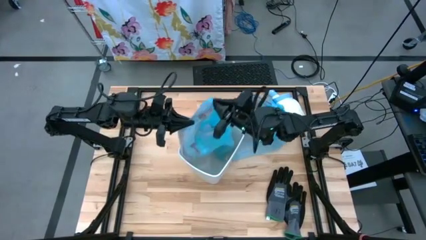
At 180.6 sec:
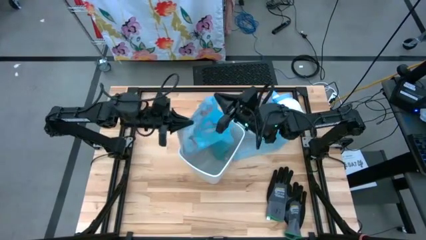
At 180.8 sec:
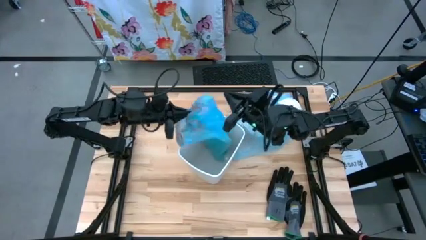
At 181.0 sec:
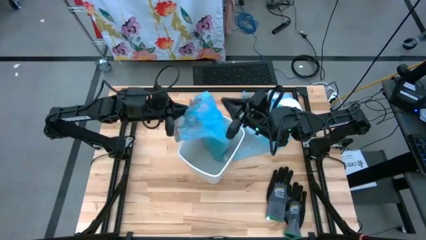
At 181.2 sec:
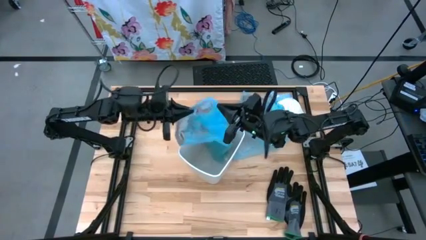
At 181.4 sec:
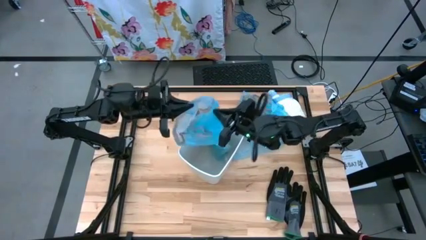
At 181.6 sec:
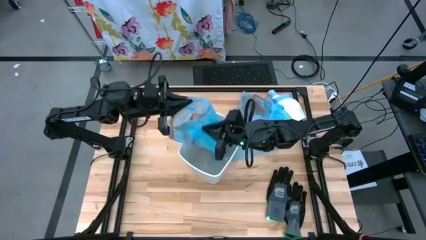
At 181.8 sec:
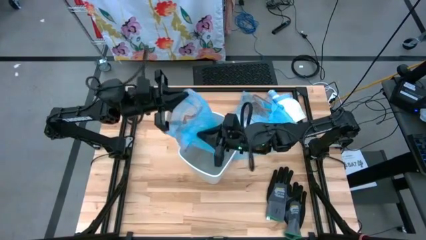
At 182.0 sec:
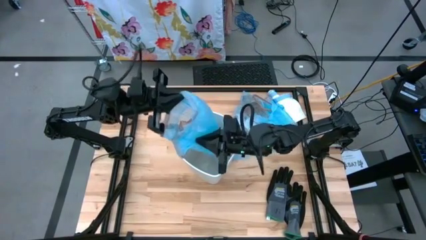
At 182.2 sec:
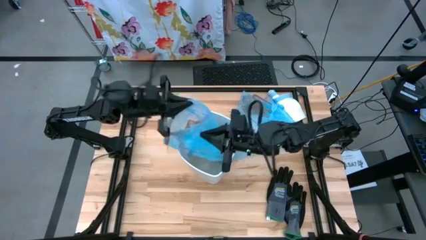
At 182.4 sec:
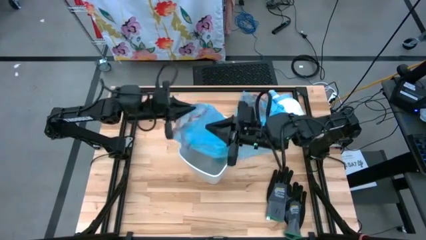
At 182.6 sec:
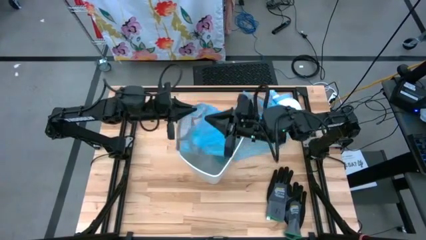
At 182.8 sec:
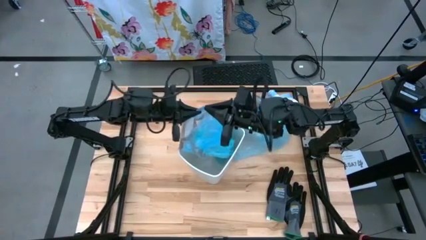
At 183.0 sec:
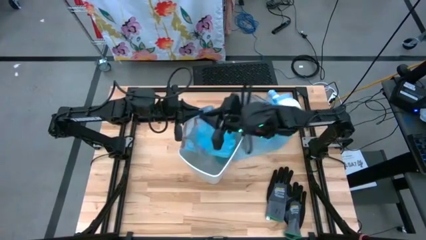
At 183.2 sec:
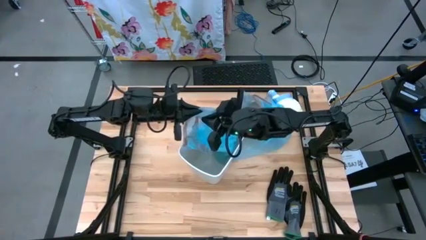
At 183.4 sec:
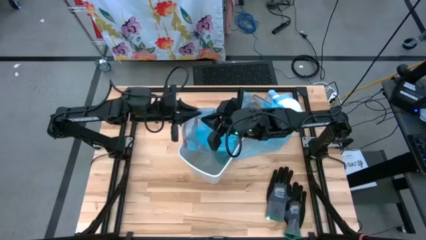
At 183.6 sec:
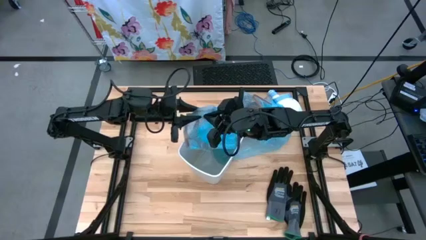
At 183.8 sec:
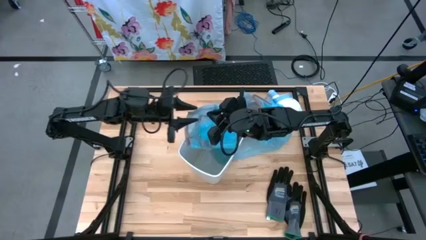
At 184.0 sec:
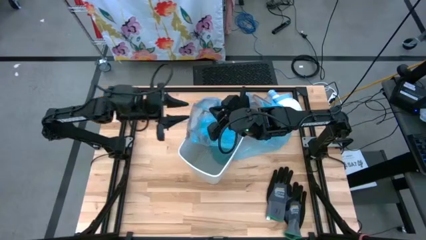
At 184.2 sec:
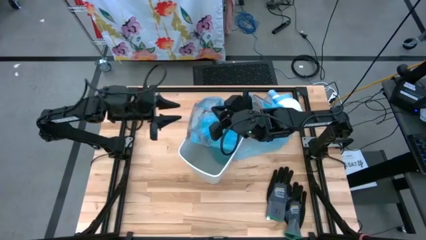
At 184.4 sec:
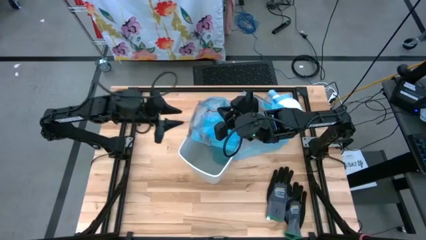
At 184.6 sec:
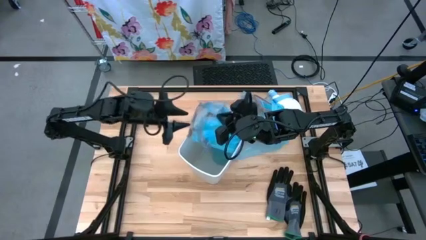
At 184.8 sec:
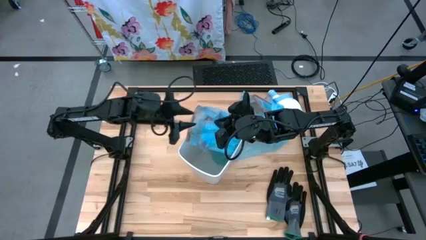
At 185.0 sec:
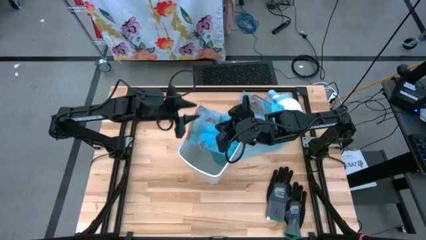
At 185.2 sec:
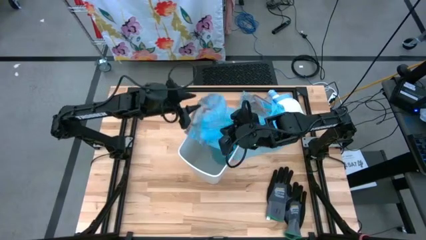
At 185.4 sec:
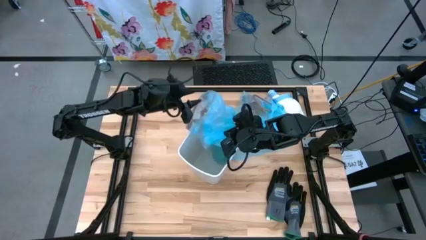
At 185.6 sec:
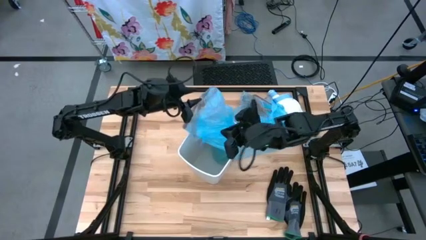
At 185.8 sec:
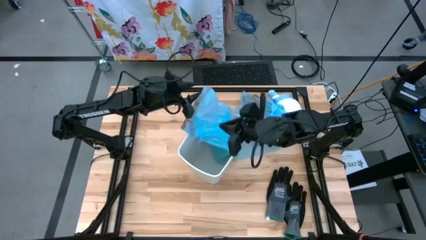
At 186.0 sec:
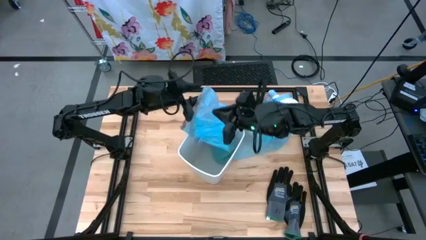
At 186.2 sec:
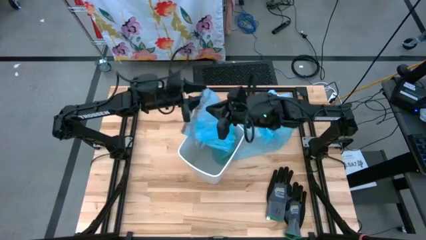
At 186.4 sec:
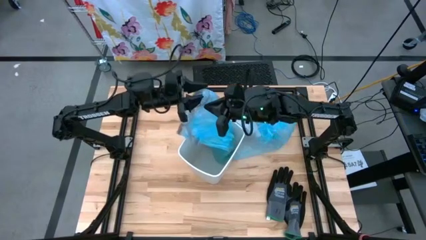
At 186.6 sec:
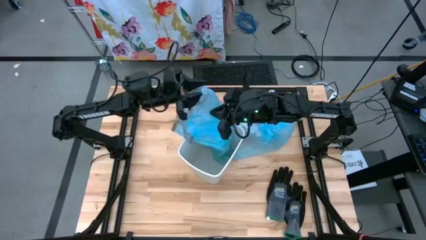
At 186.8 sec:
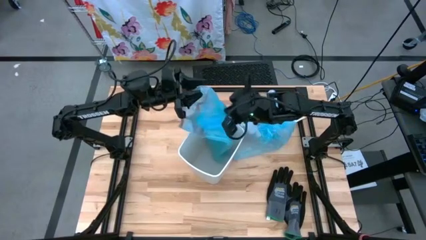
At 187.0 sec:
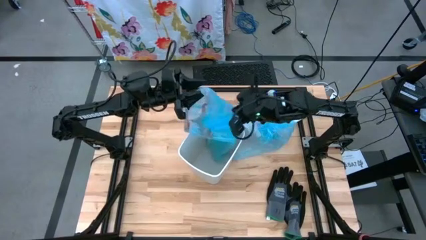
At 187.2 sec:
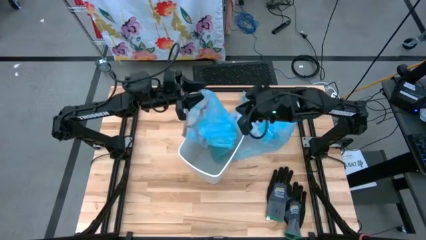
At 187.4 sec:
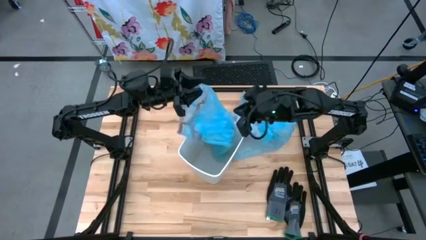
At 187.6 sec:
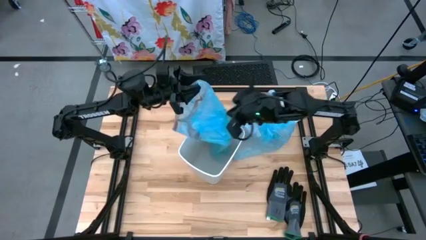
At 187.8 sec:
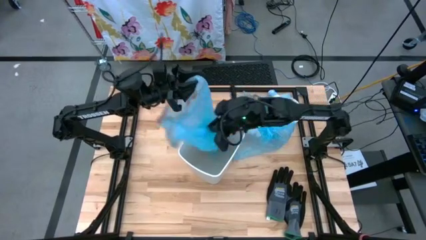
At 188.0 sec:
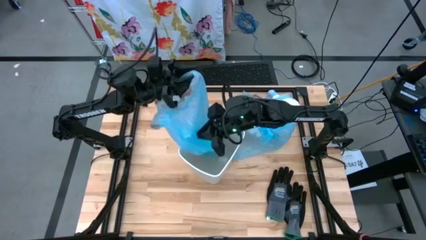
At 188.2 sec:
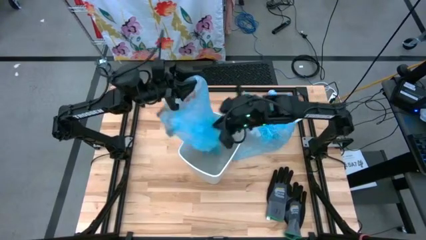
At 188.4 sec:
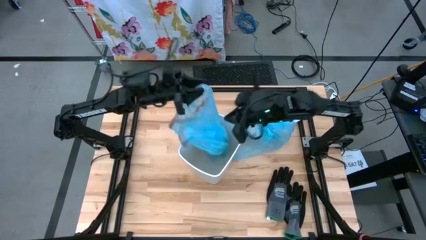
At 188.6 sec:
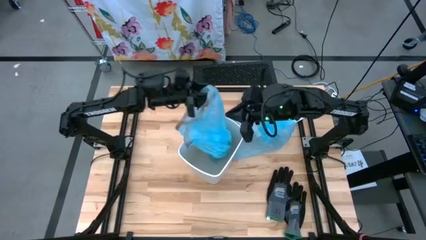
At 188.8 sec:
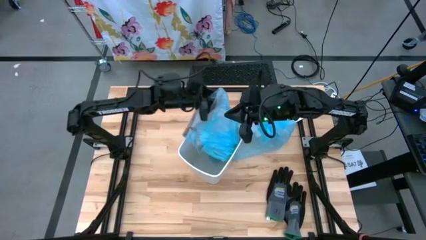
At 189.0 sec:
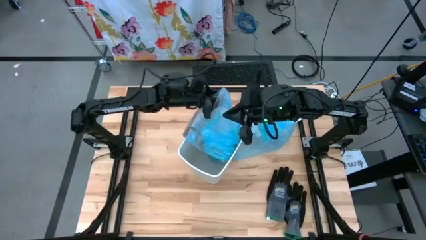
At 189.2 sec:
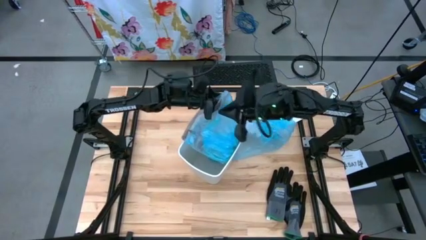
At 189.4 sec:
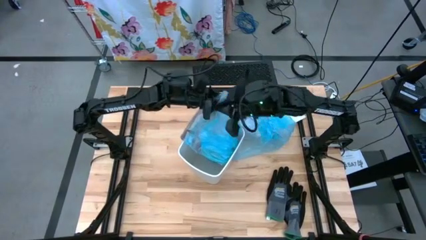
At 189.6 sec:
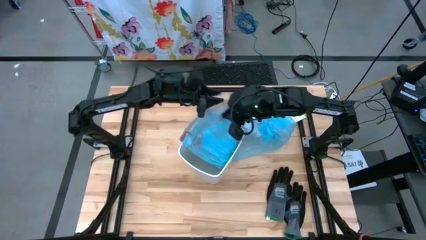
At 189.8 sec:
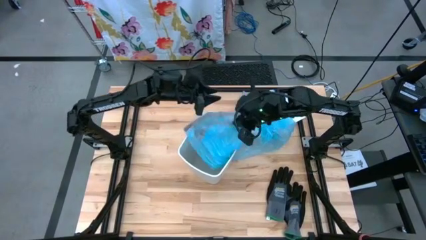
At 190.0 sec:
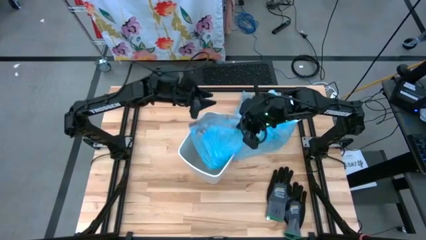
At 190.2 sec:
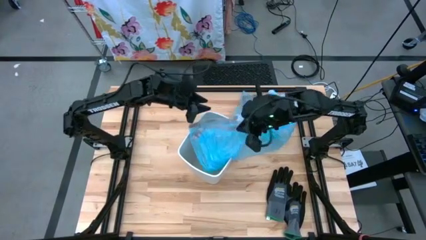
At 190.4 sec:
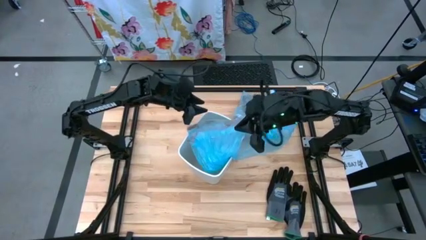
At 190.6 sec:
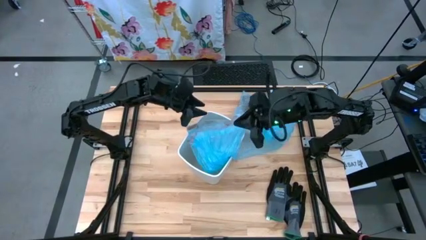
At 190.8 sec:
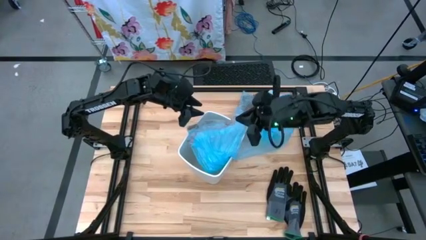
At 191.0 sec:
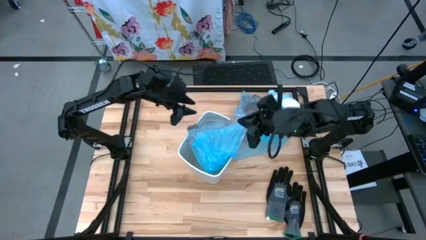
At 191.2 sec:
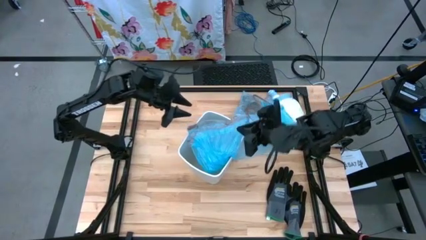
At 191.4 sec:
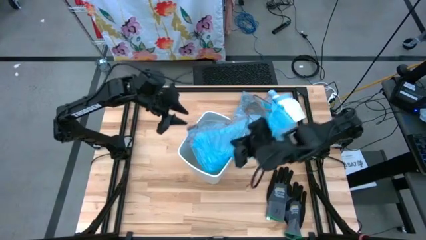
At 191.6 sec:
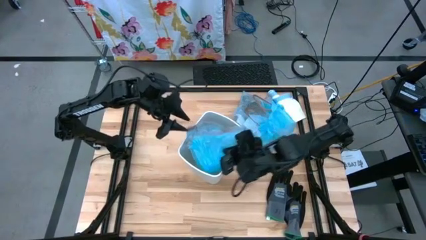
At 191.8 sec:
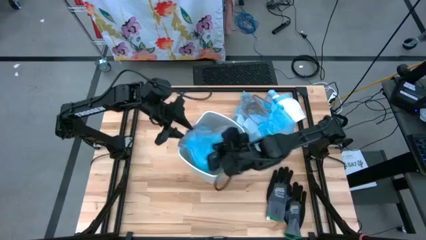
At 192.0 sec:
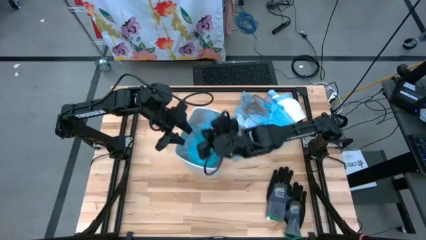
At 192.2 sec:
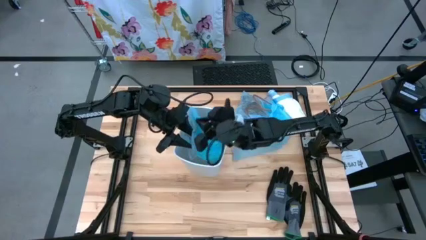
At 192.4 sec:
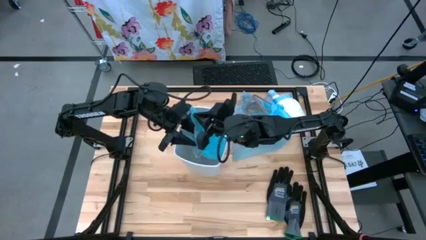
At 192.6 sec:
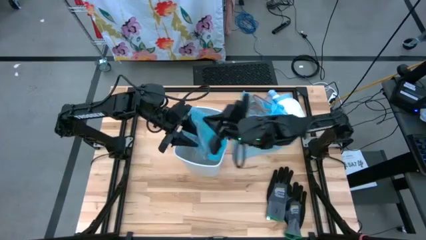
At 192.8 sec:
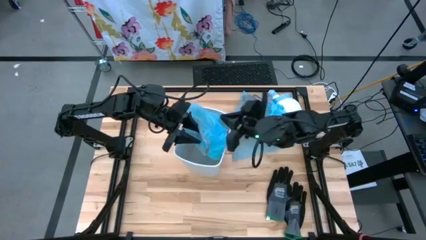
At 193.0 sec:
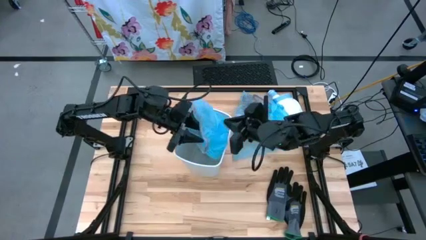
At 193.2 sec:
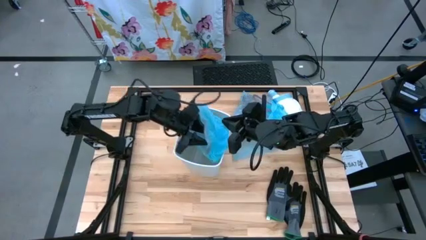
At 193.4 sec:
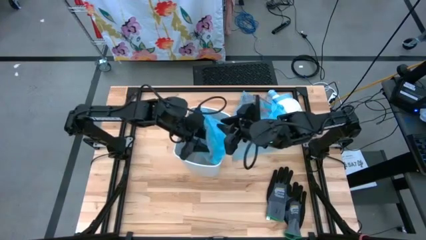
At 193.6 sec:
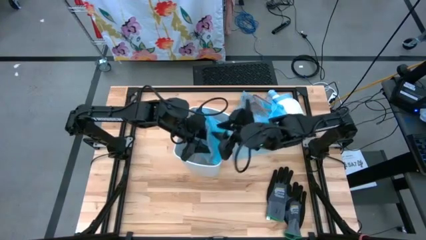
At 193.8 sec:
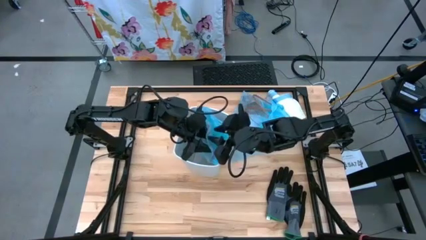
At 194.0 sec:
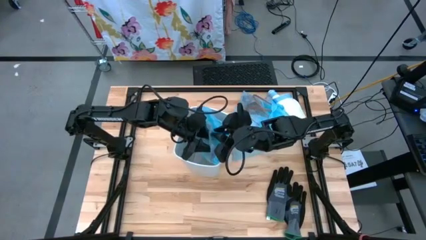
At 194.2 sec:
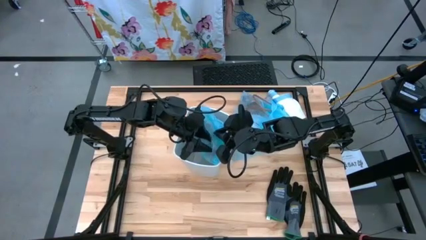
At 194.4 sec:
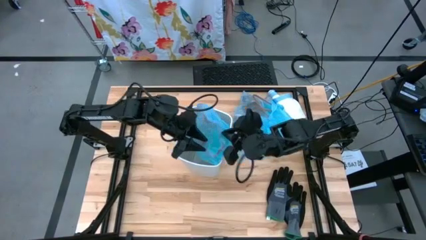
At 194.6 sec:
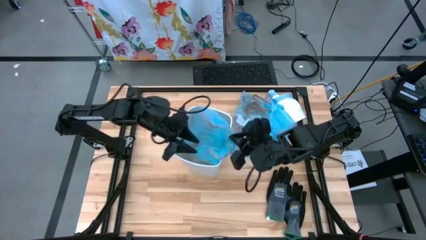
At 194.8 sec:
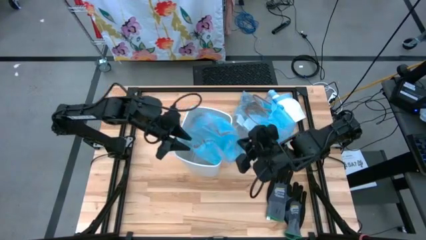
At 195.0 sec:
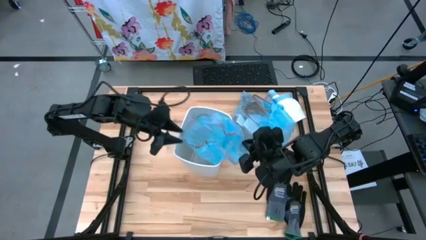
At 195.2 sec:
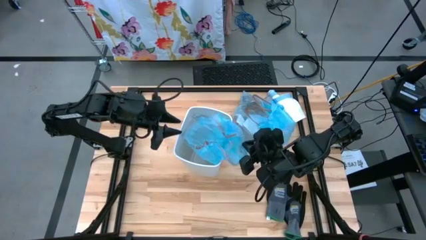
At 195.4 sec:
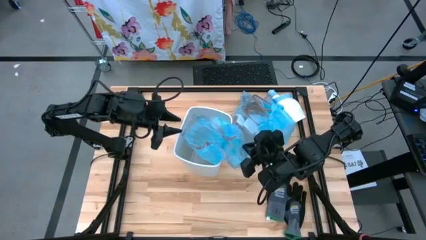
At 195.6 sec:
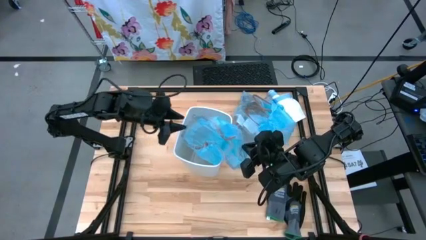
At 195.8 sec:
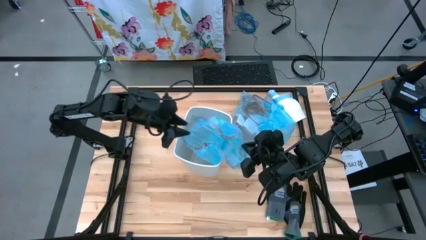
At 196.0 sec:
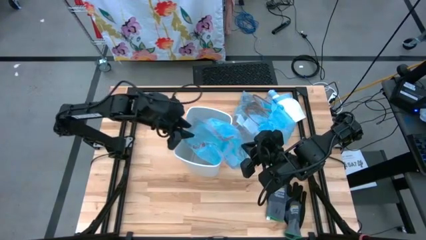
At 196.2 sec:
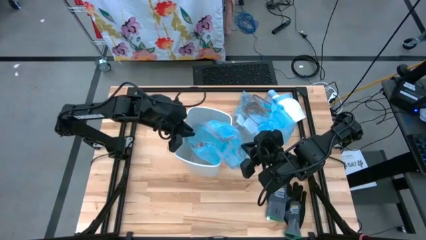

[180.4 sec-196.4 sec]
Task: place trash/remove bag and relplace
Insert the new blue trash bag into the white trash bin
